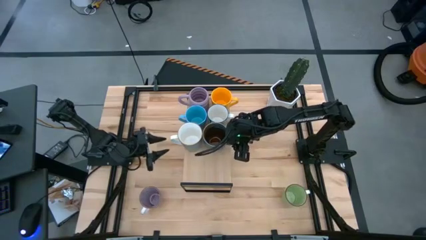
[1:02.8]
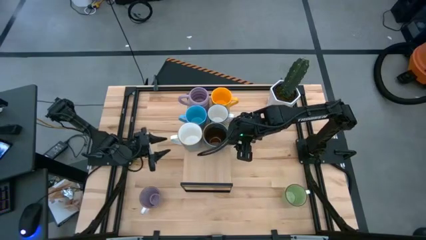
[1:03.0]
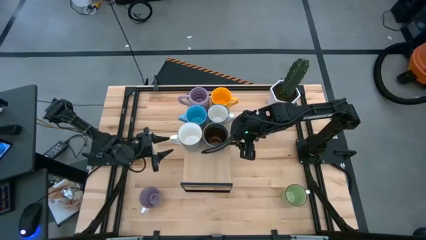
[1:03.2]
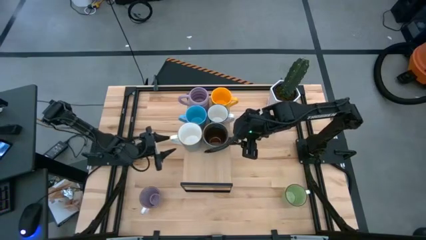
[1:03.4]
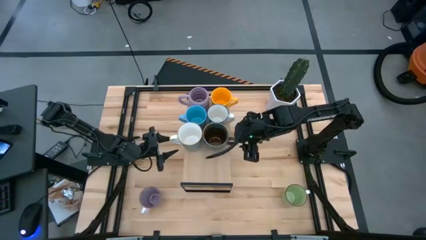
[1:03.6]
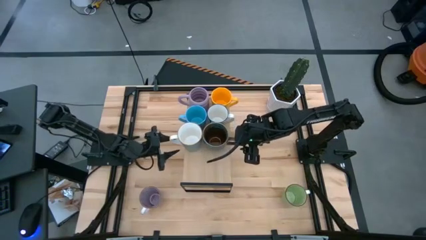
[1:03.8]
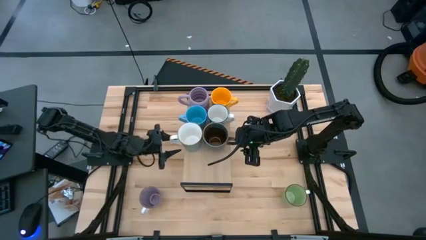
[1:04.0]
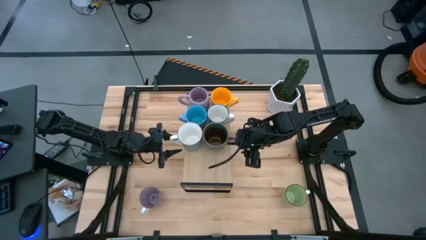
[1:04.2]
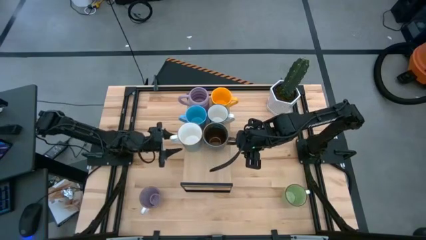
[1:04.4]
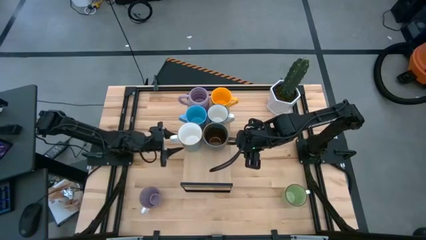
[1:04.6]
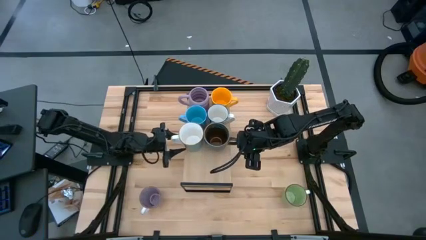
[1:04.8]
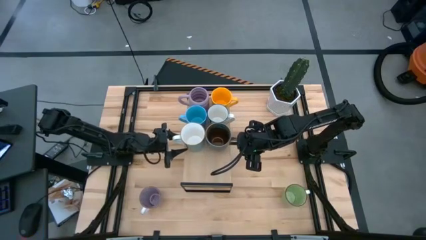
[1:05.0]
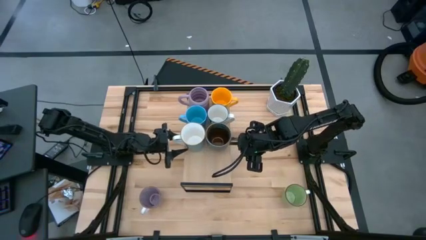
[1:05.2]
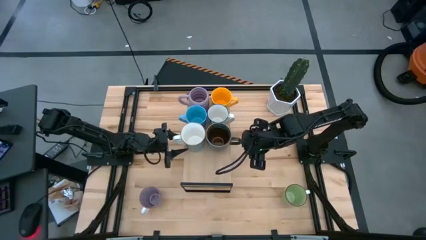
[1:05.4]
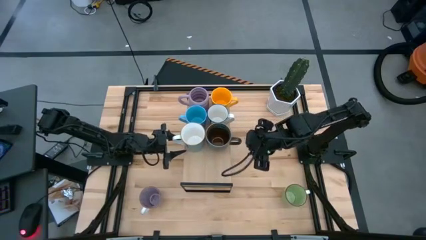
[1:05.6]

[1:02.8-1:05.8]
Task: Place coffee mugs
Adjust the blue mug

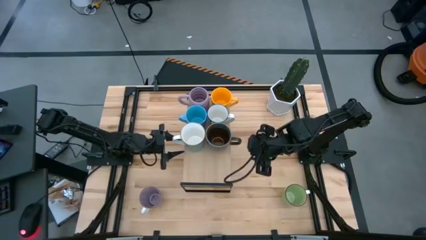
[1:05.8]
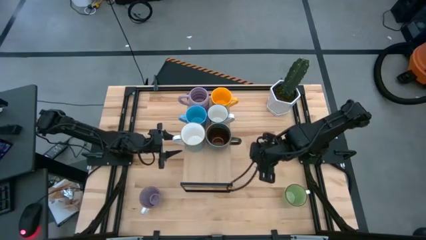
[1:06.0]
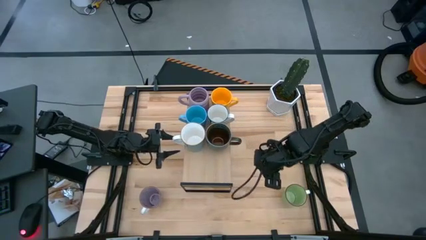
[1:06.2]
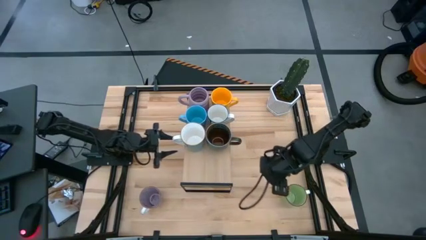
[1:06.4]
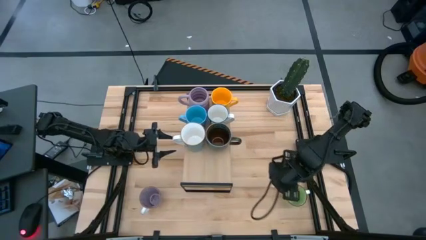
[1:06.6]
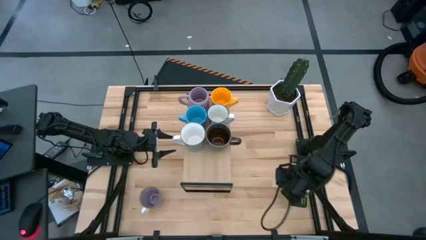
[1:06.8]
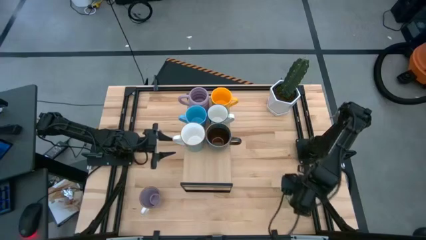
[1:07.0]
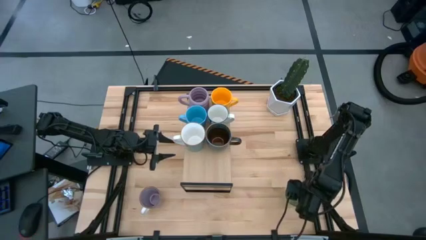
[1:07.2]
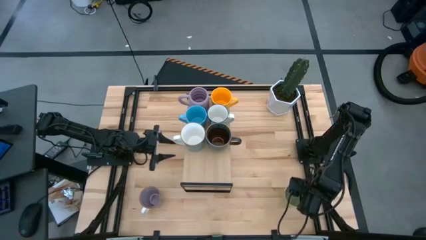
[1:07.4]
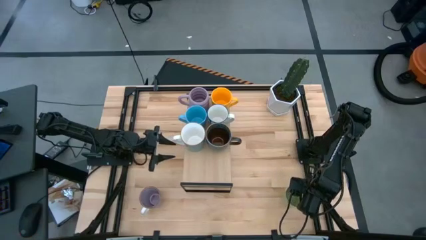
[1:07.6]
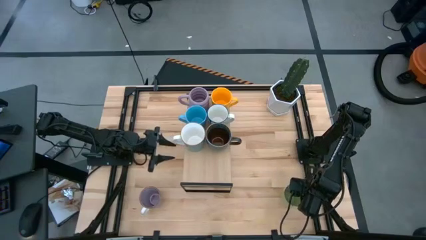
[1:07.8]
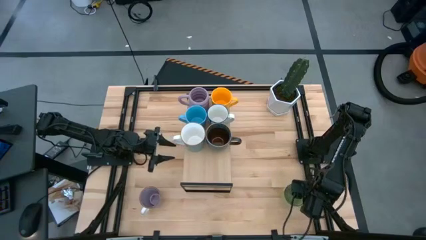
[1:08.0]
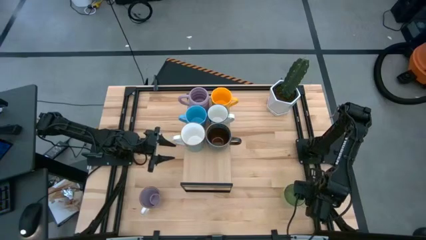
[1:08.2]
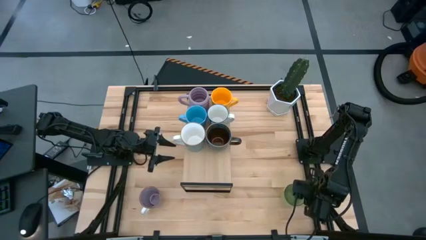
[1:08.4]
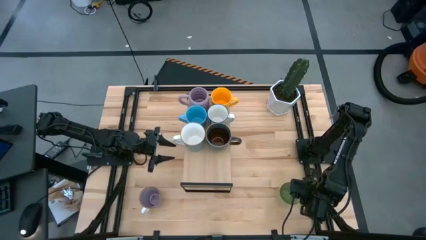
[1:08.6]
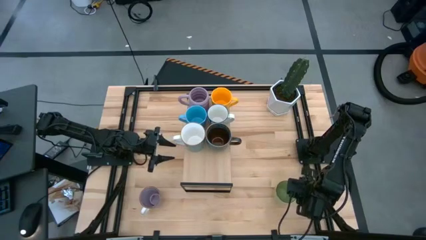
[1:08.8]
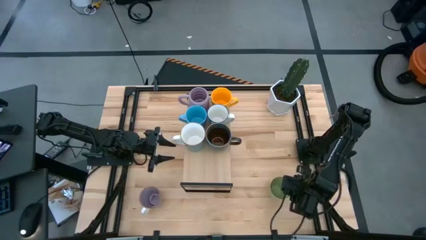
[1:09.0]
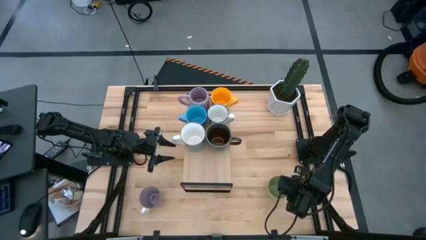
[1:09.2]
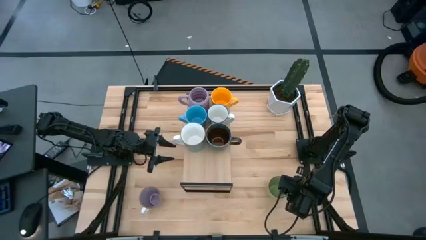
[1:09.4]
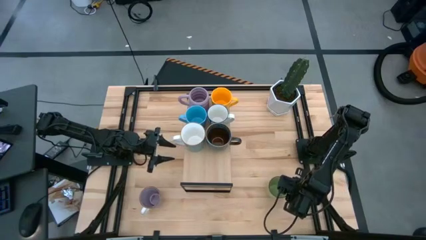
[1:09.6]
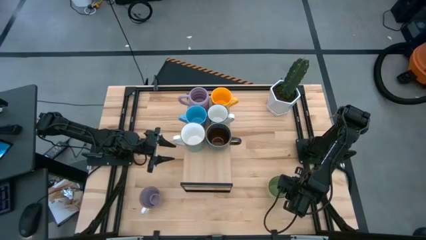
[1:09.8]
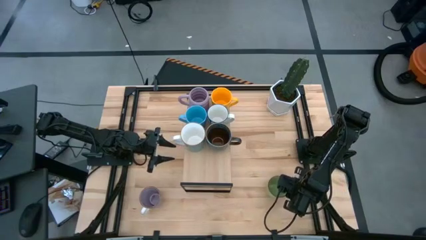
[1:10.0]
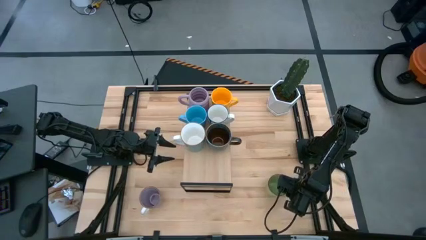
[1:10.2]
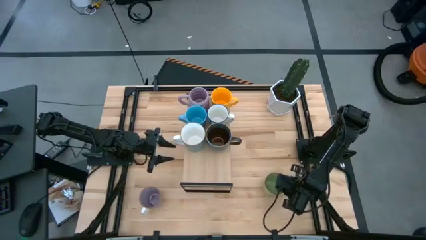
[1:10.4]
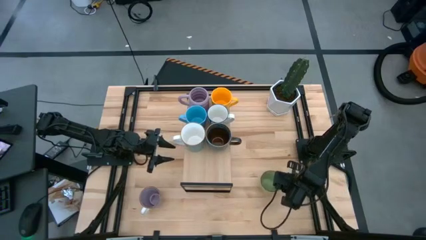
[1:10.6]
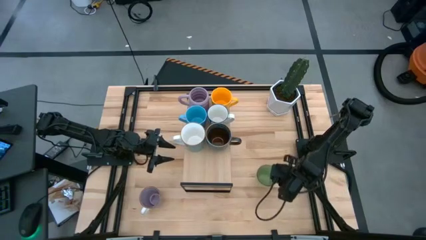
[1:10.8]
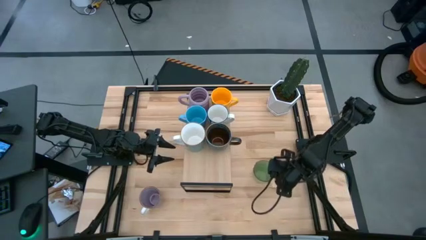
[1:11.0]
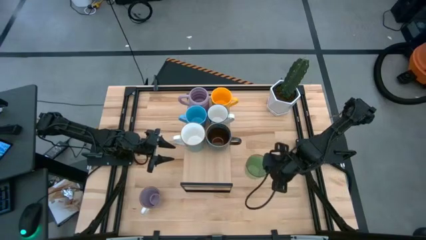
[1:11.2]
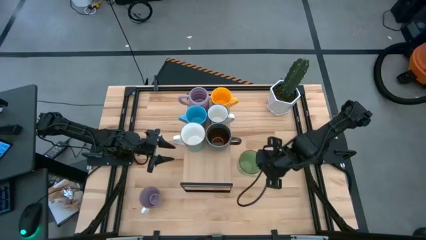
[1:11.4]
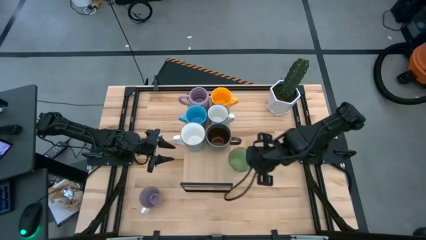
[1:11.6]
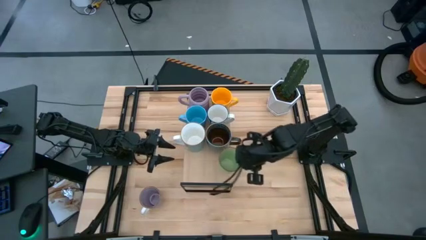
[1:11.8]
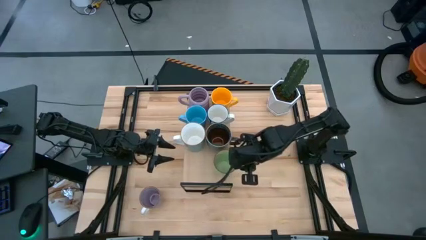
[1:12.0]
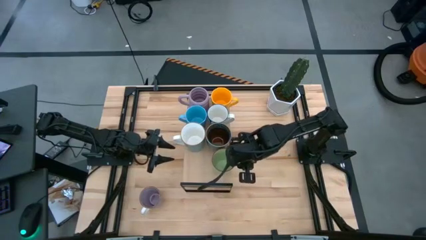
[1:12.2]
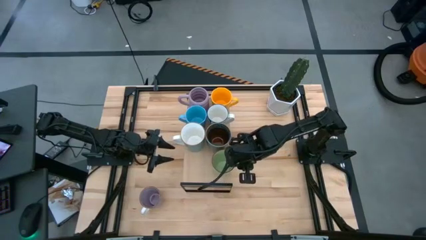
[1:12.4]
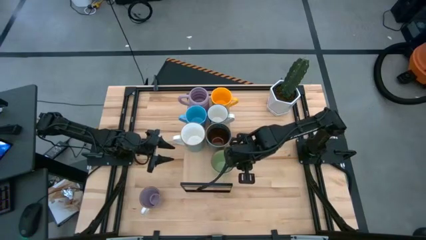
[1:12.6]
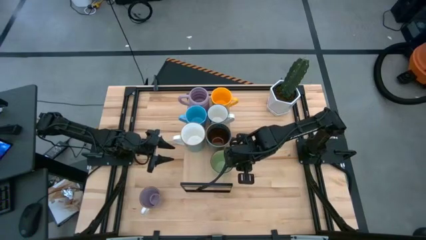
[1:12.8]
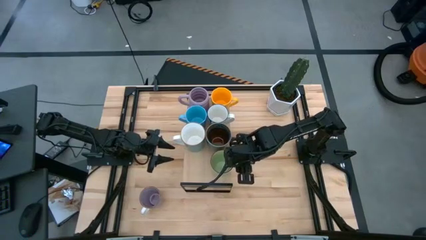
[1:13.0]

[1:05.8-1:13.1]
Put the green mug on the shelf
